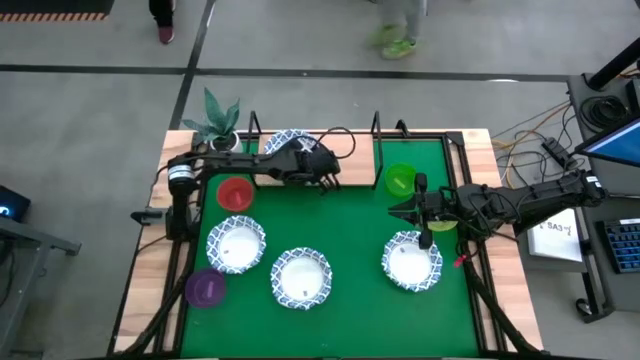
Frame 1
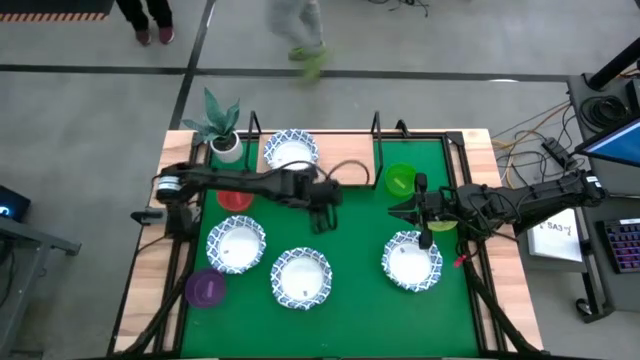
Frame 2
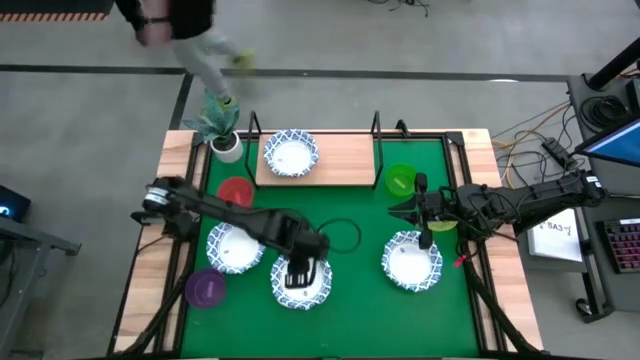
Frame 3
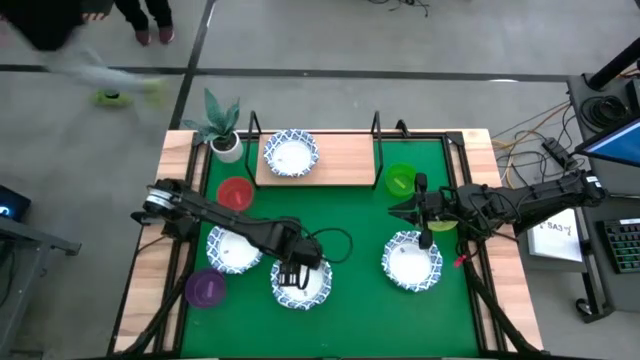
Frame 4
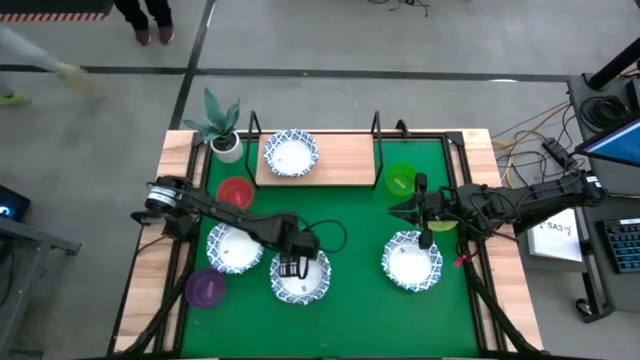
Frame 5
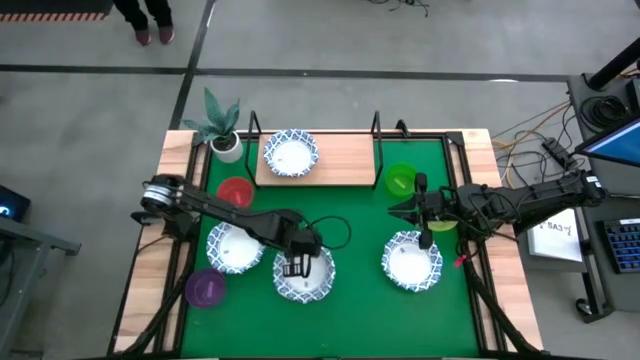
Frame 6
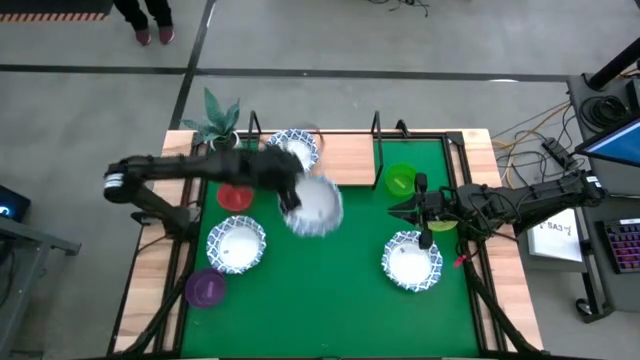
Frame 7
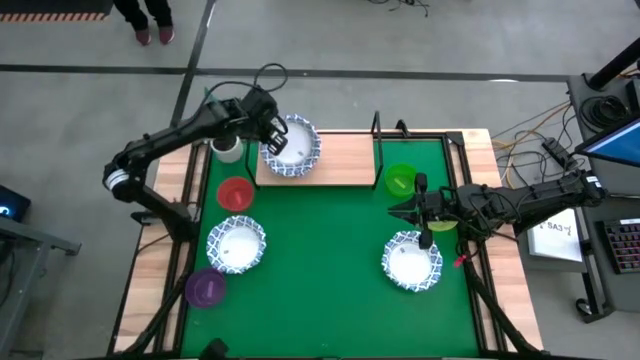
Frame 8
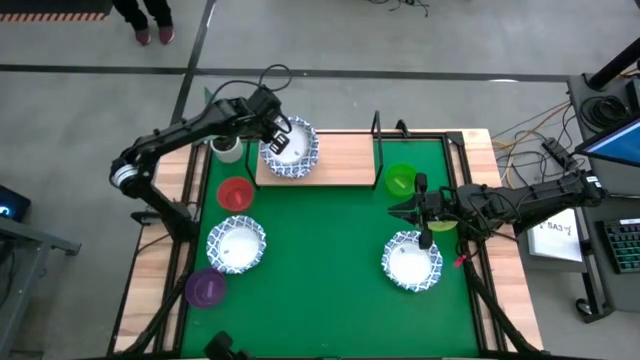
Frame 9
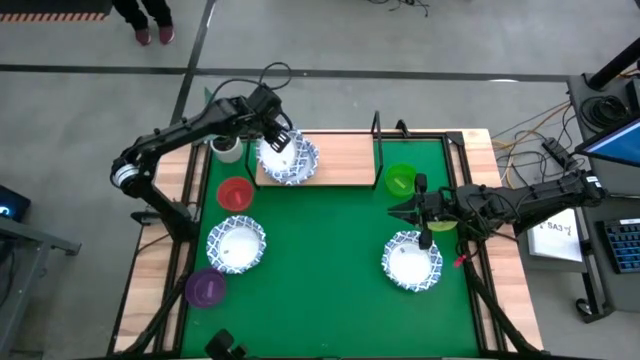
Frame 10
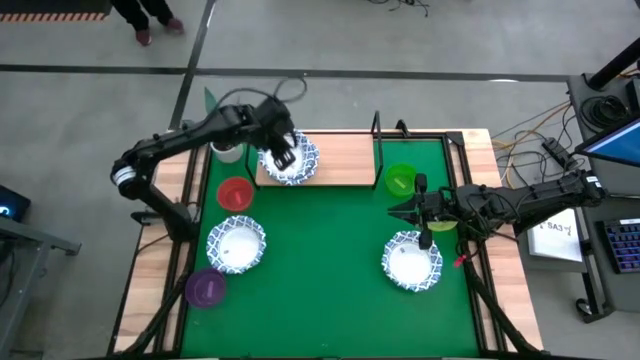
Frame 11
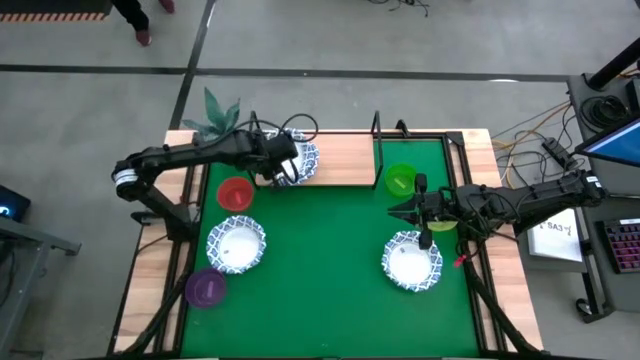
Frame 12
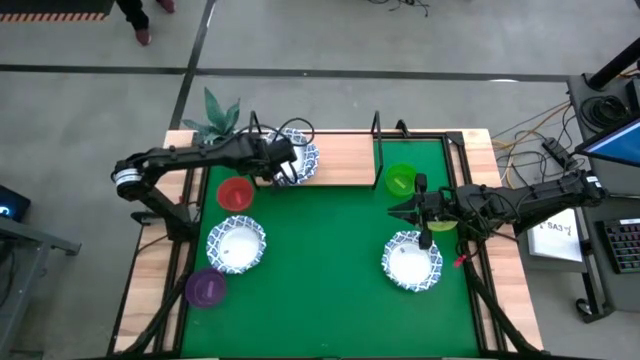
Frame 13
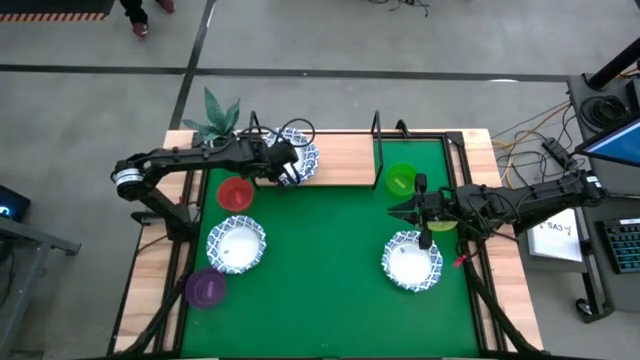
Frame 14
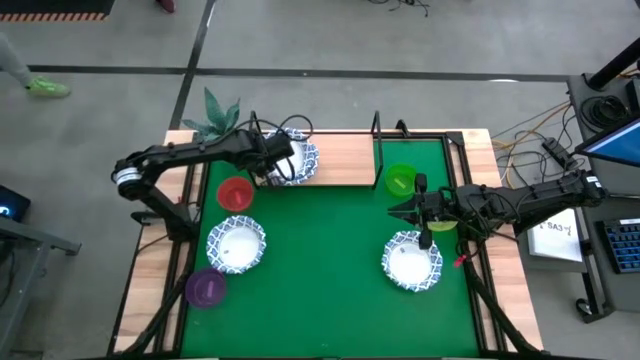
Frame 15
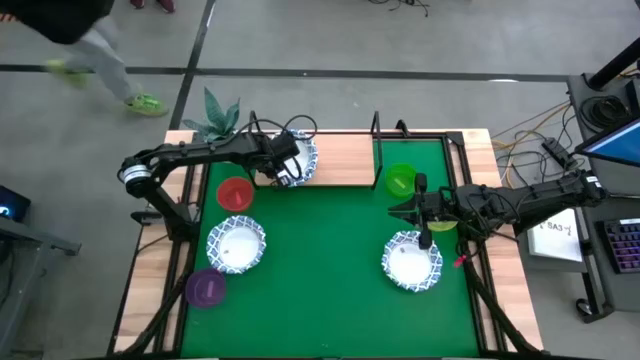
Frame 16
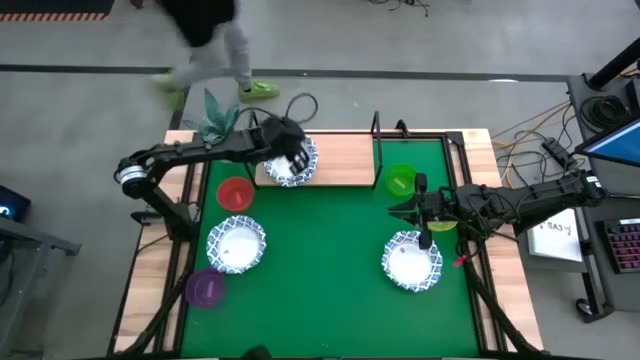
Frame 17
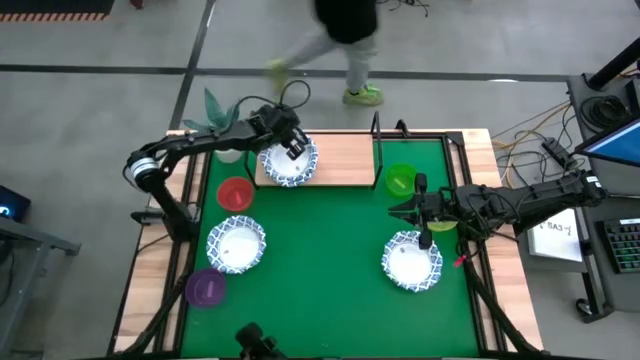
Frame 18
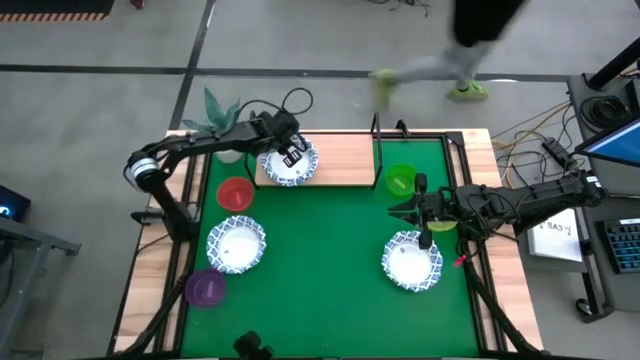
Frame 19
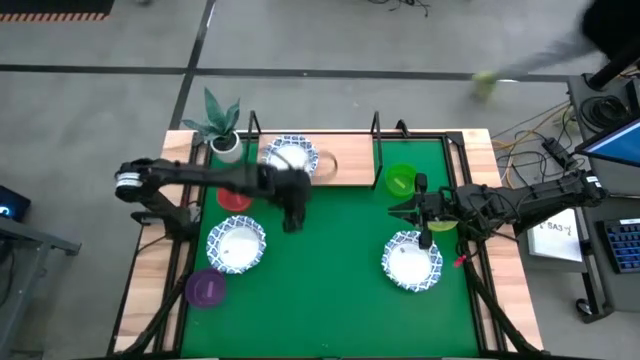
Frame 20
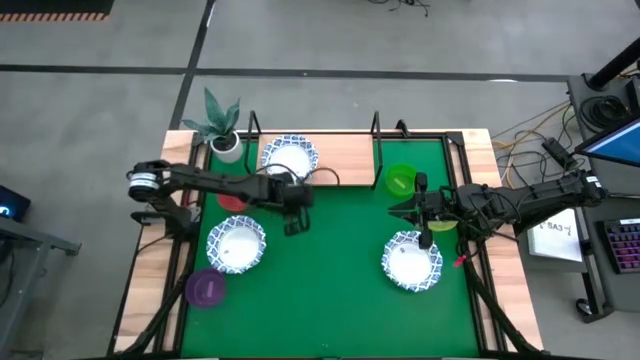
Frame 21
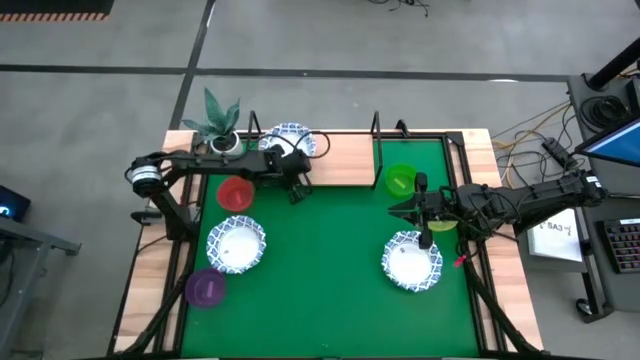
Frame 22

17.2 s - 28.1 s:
Task: Place and stack bowls onto a shelf
Stack the white patterned bowl on top of the white patterned bowl on the shelf

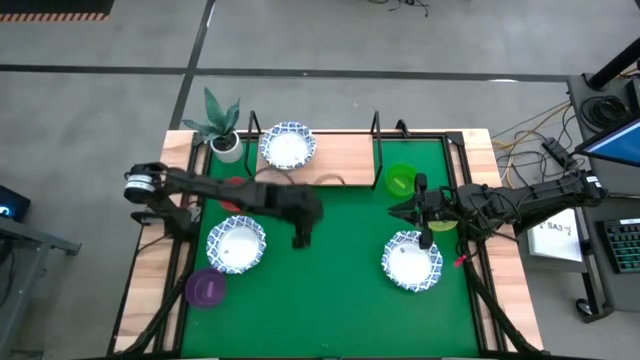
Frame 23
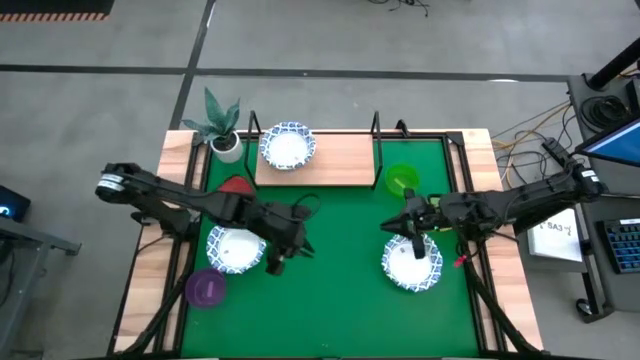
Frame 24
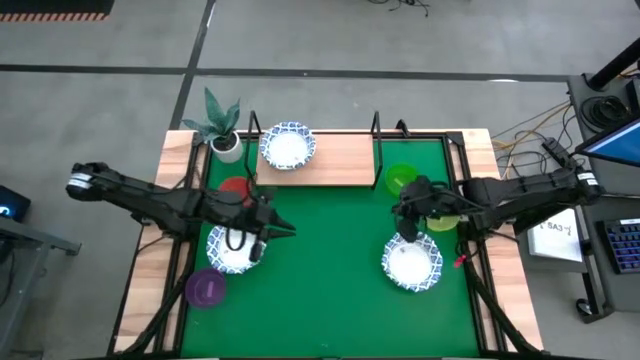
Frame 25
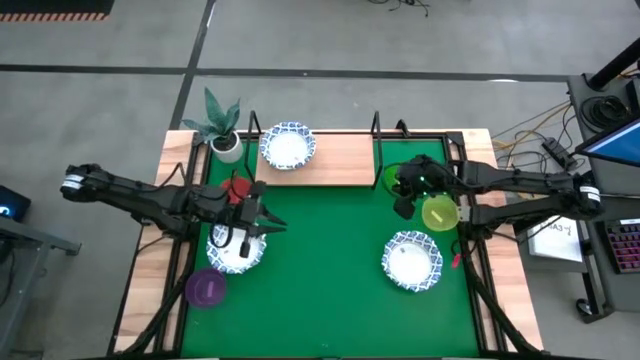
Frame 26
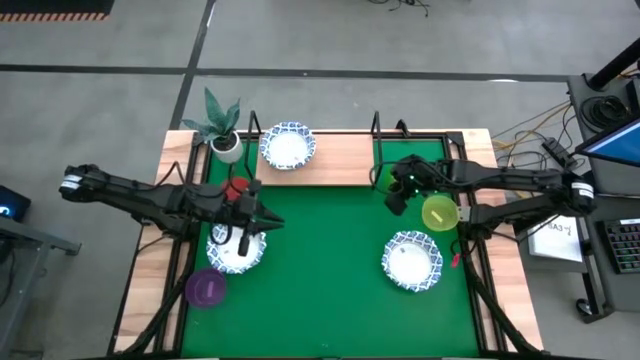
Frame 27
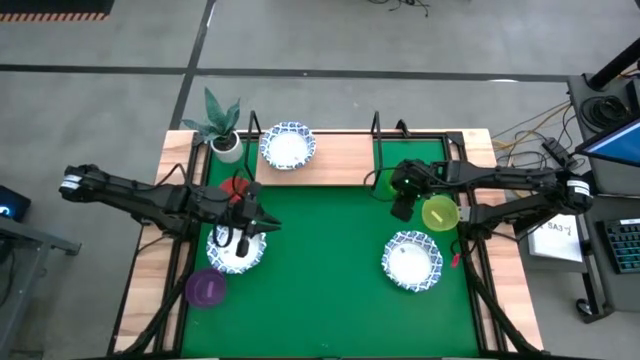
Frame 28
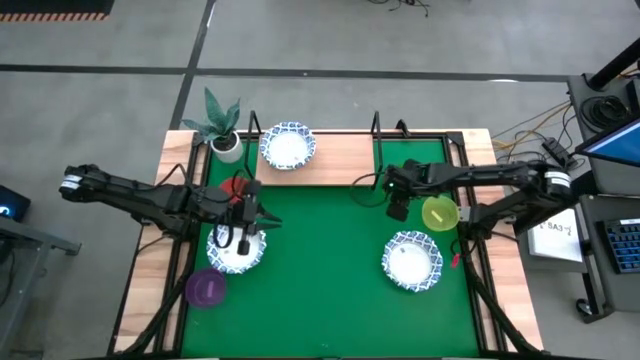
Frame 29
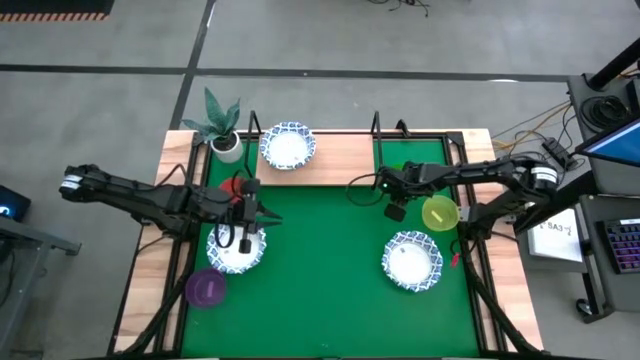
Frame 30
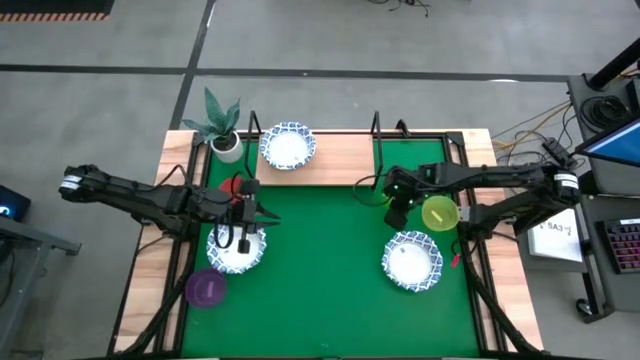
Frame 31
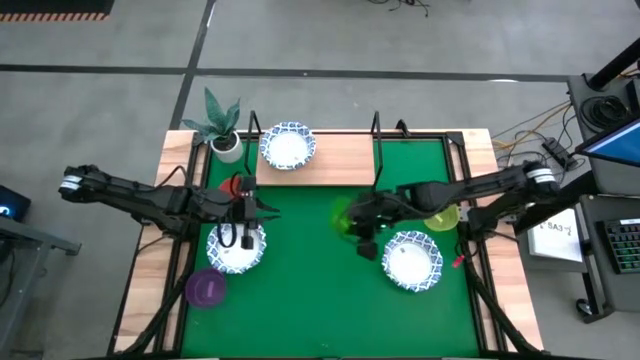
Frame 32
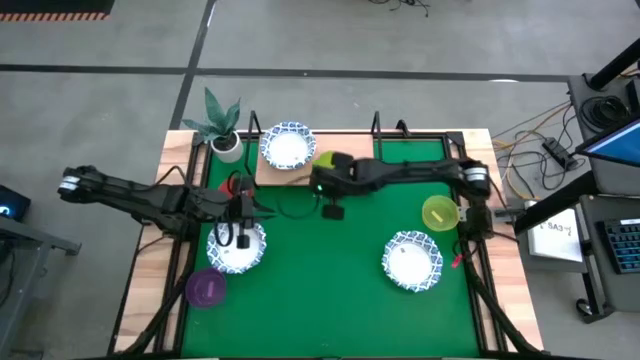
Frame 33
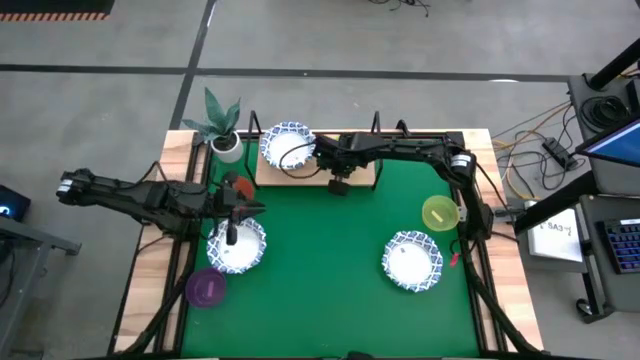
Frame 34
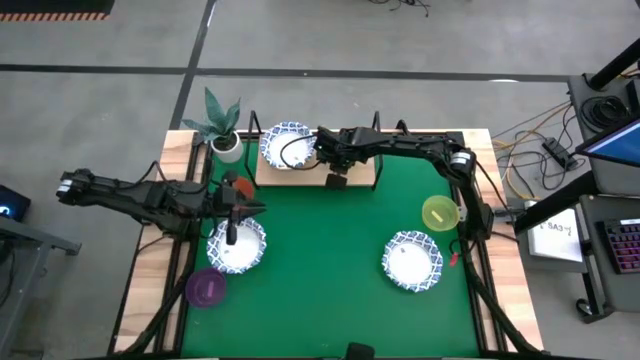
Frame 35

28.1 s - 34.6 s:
Put the green bowl on the shelf

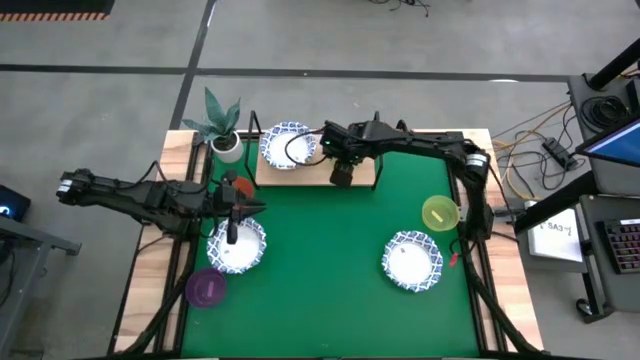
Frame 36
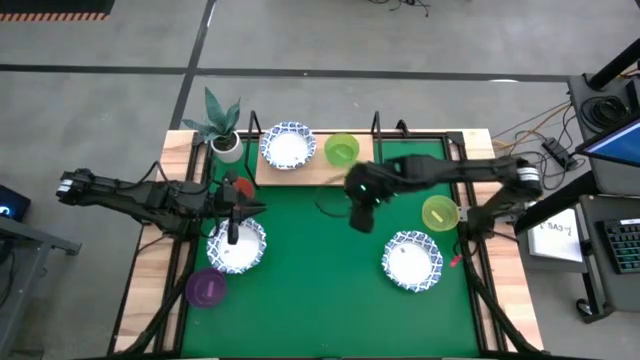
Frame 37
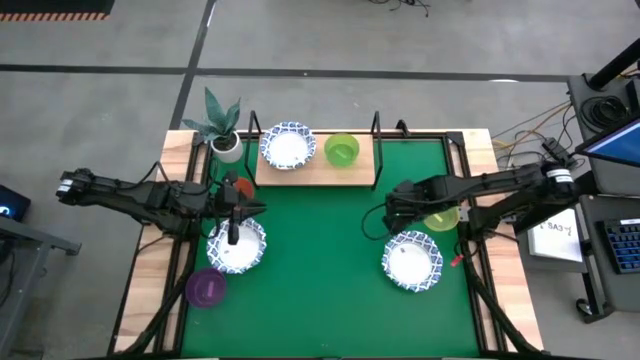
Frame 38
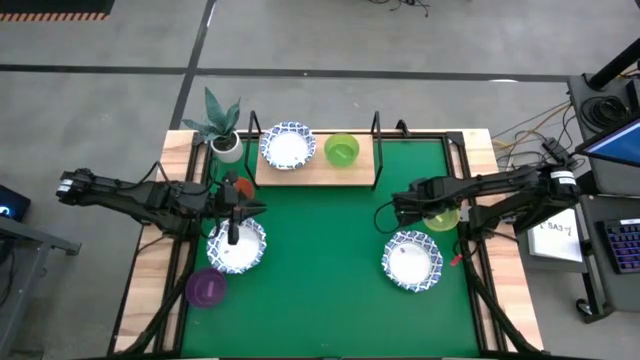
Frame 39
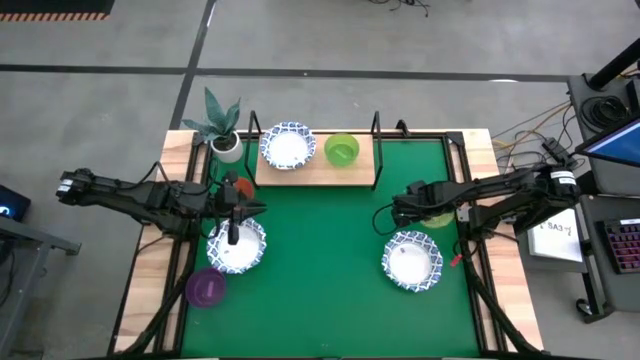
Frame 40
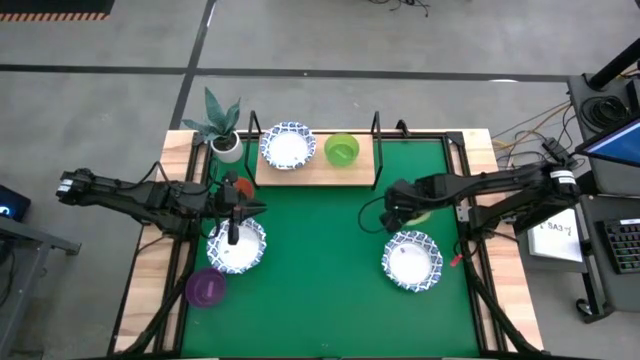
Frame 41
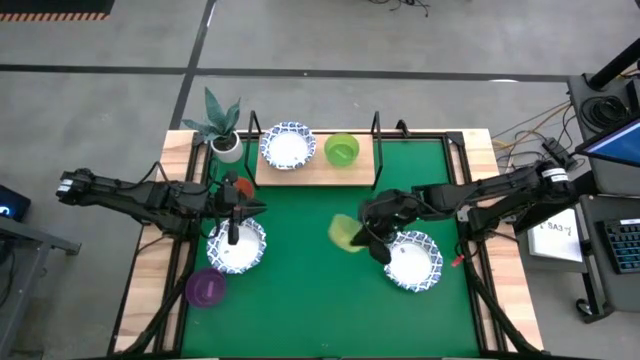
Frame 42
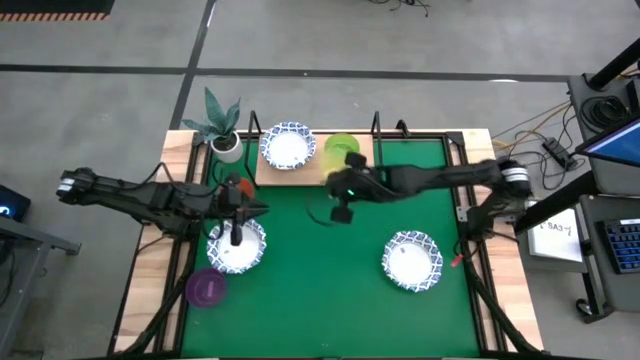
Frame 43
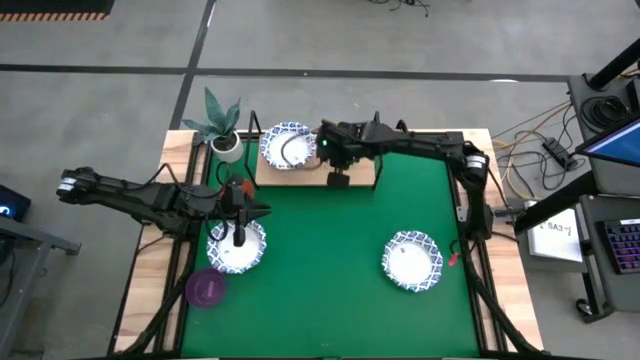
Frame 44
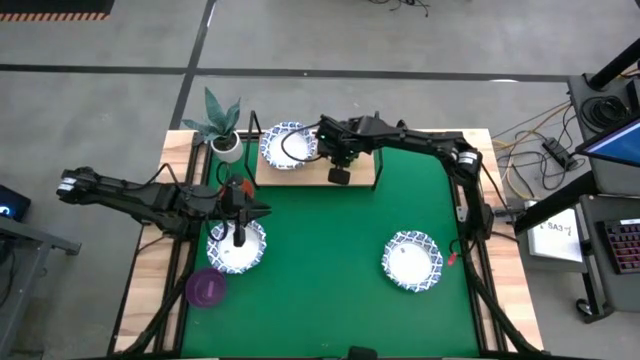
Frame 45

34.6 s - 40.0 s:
Stack the yellow bowl on top of the green bowl on the shelf
